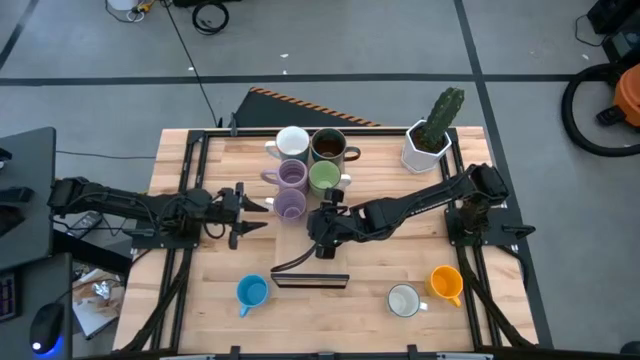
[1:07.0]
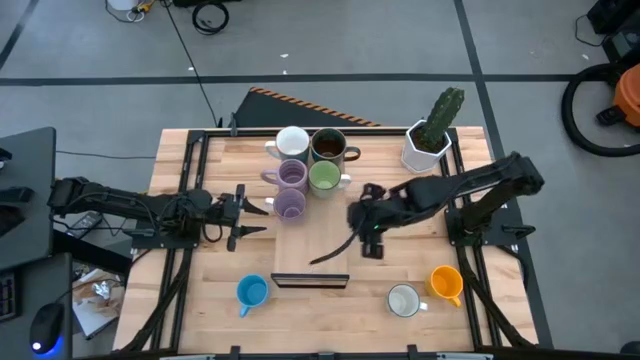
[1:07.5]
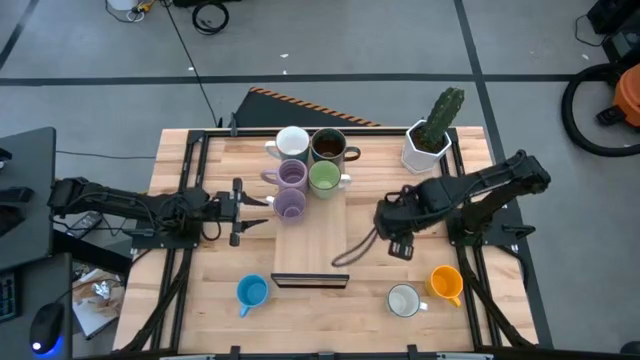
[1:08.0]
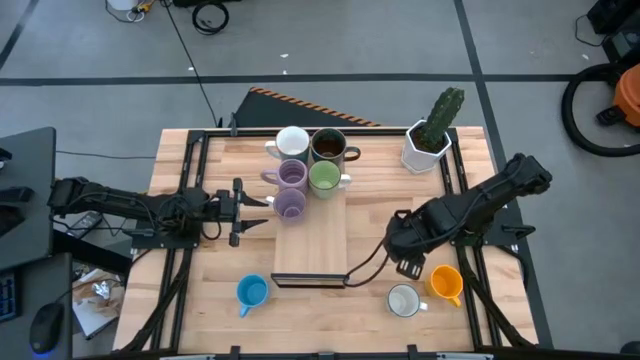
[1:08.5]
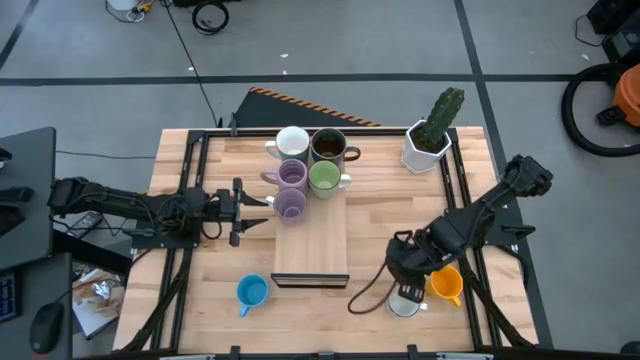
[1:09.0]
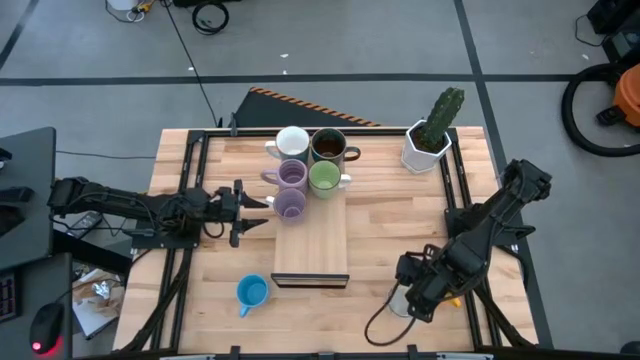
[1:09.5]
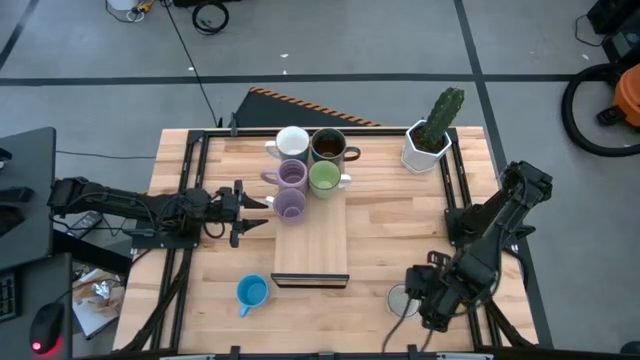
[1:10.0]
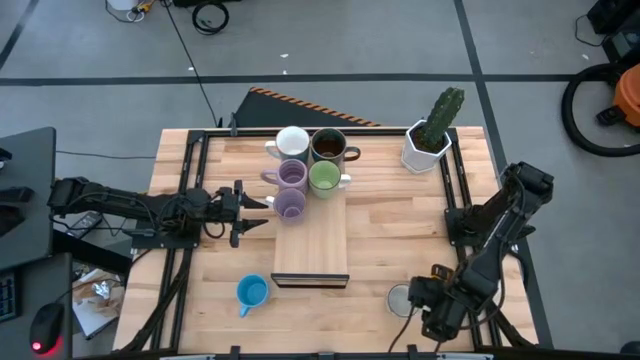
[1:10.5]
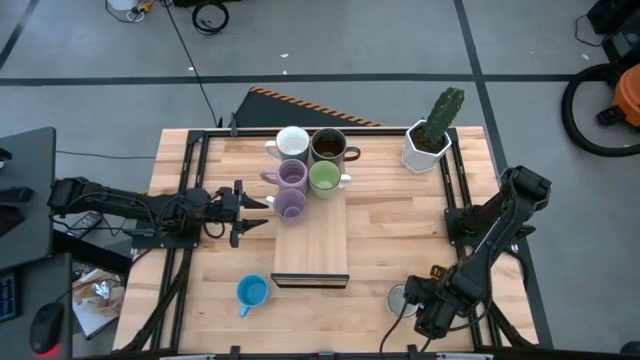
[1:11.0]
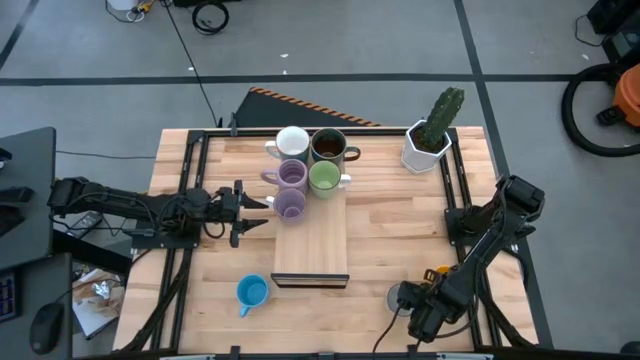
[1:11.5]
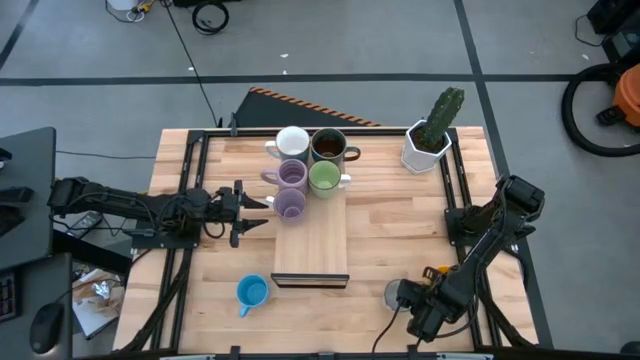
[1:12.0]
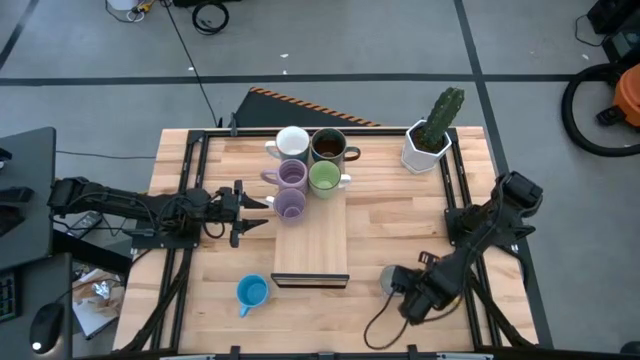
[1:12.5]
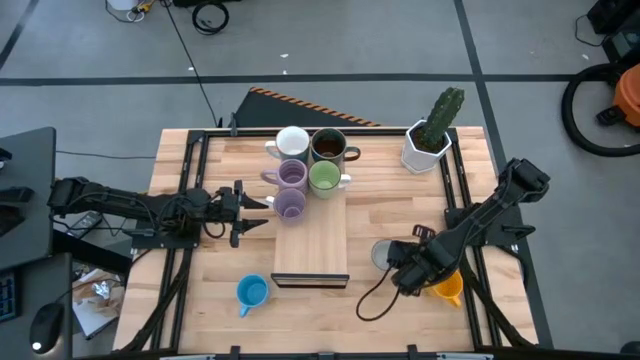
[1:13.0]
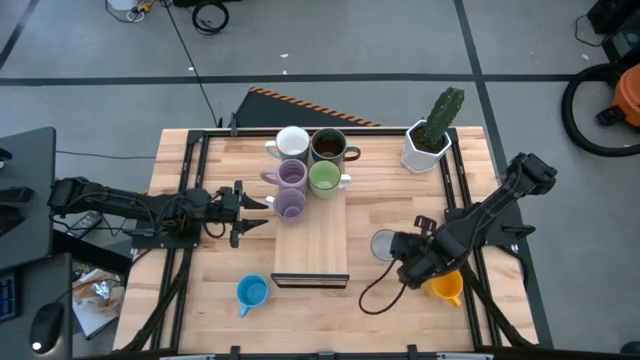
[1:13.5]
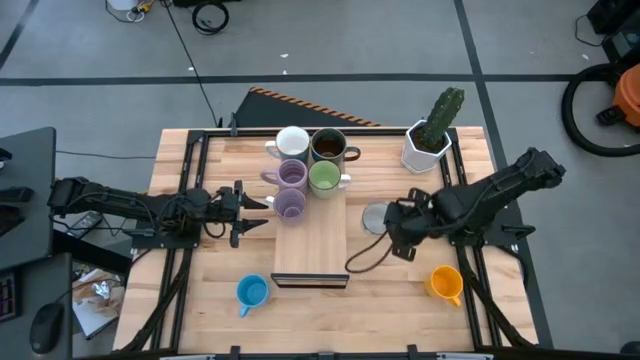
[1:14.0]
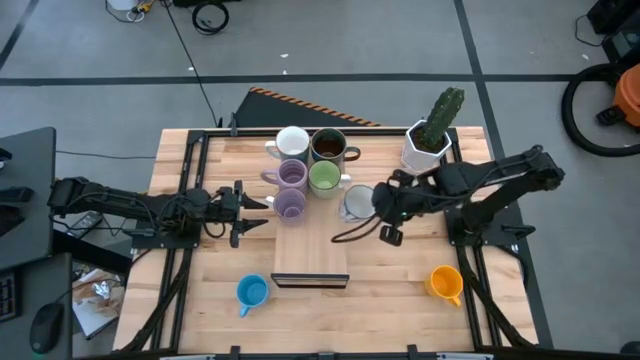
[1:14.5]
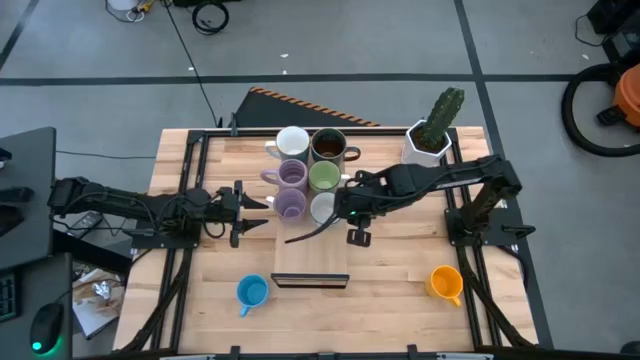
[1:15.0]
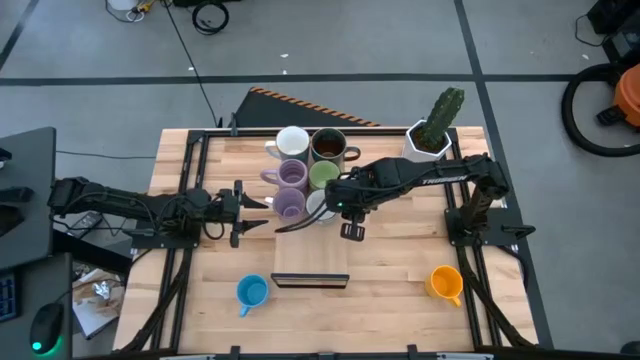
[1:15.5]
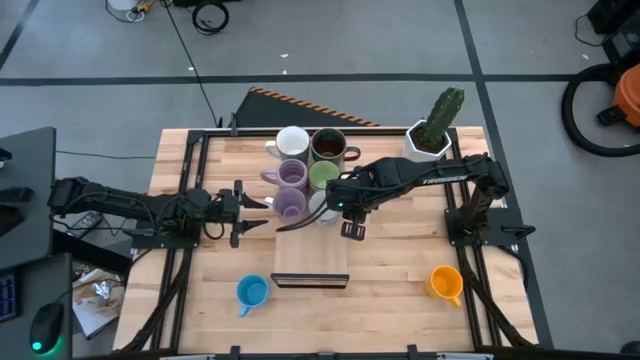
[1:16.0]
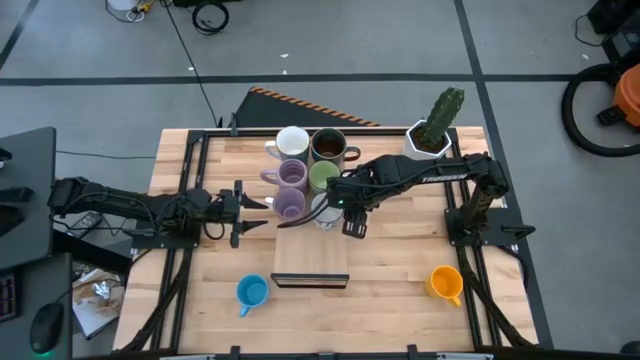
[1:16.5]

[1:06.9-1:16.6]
Task: Place coffee mugs
Put the white blue mug on the shelf

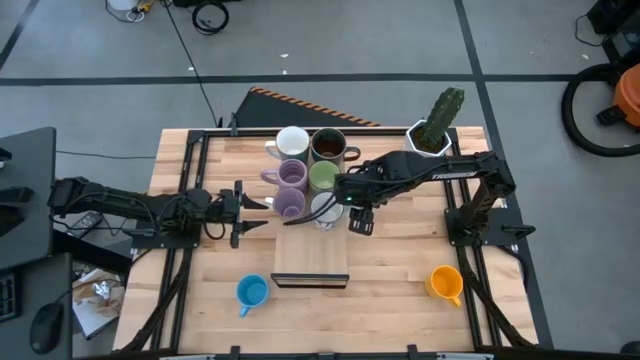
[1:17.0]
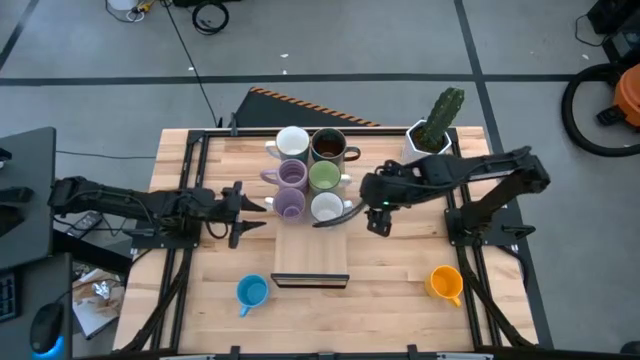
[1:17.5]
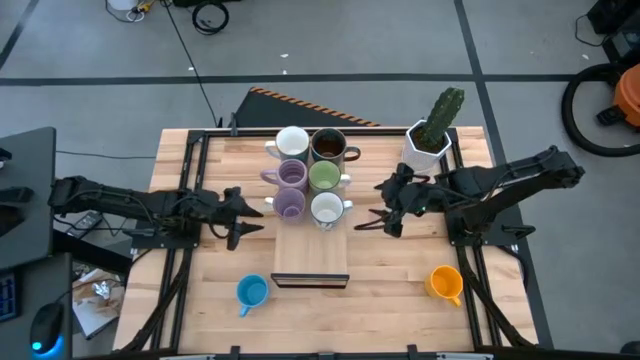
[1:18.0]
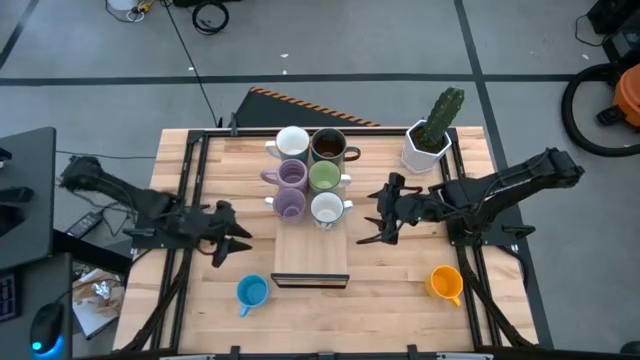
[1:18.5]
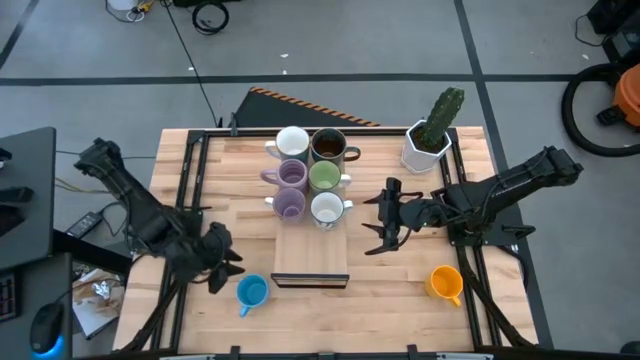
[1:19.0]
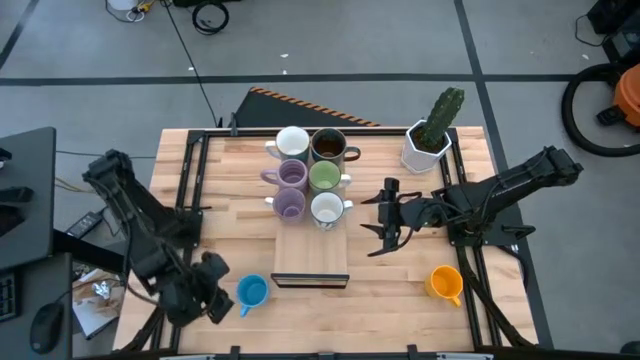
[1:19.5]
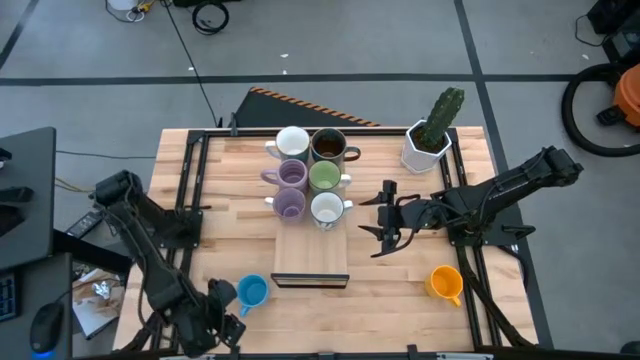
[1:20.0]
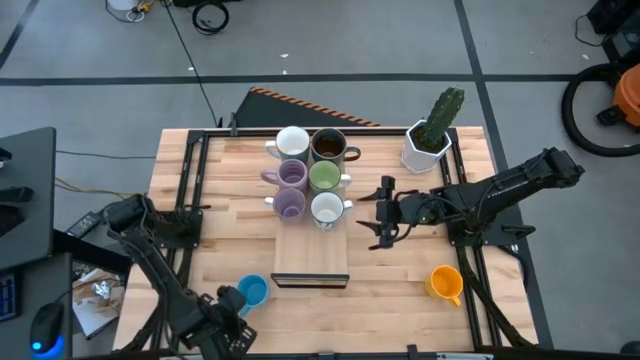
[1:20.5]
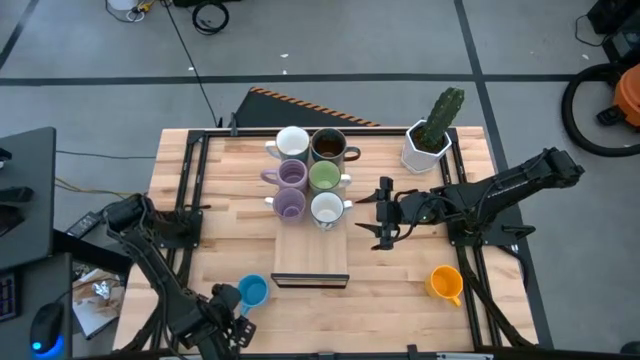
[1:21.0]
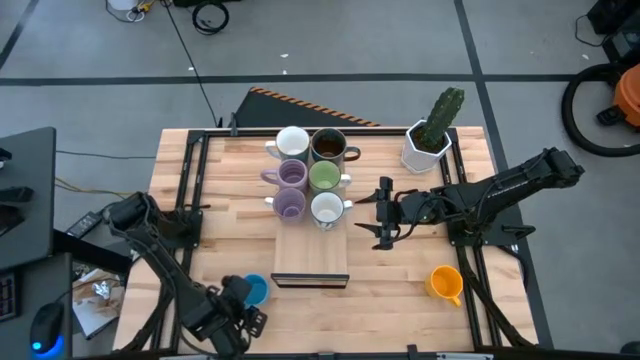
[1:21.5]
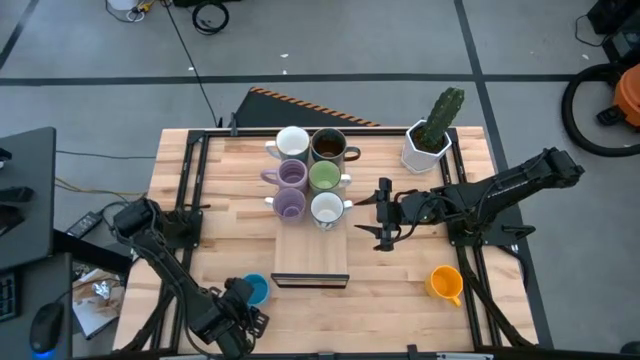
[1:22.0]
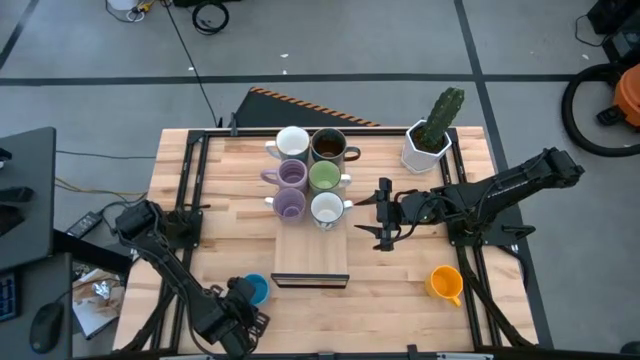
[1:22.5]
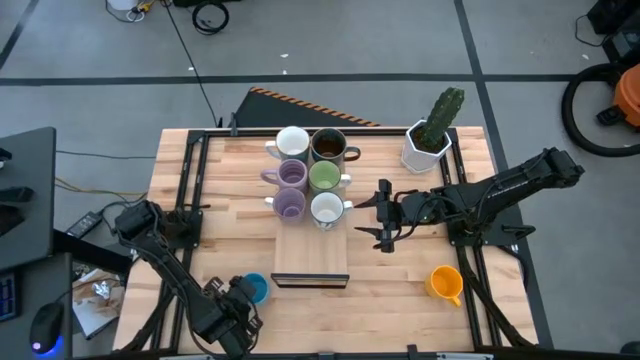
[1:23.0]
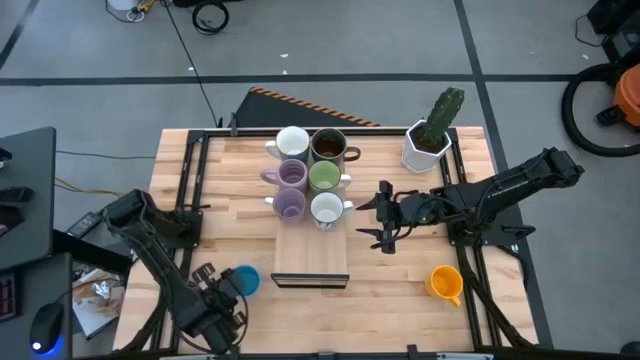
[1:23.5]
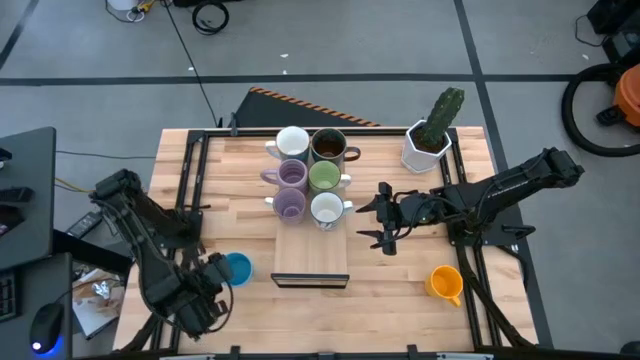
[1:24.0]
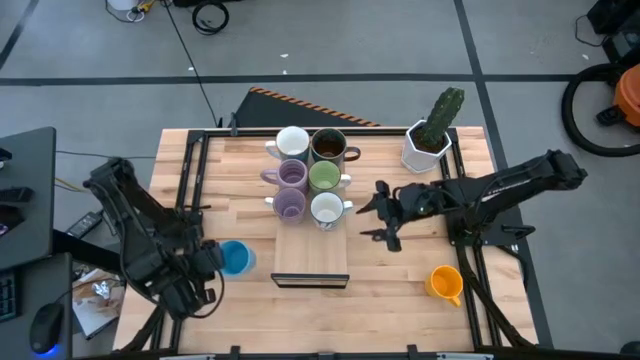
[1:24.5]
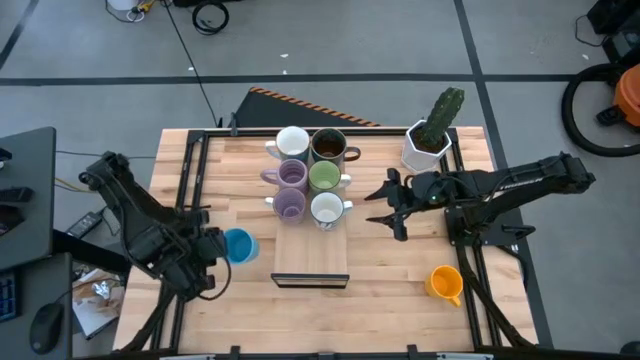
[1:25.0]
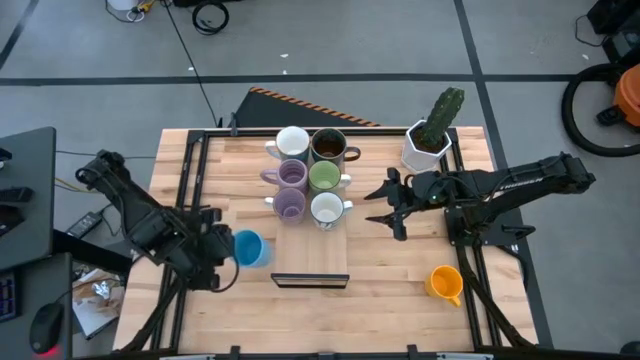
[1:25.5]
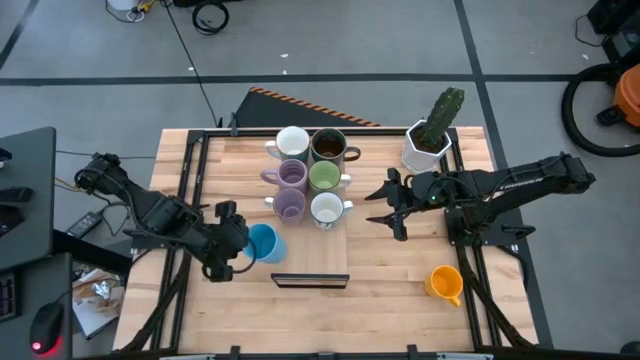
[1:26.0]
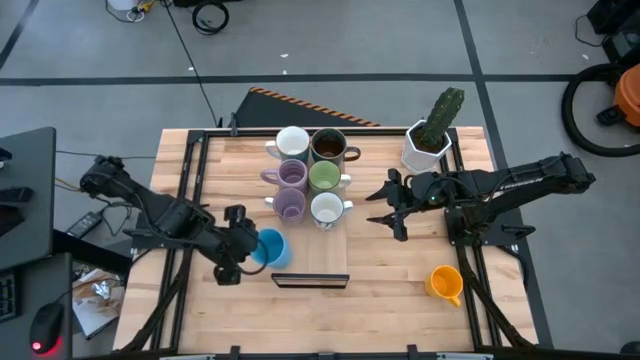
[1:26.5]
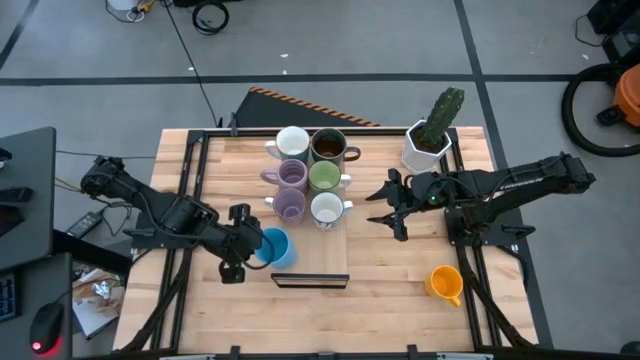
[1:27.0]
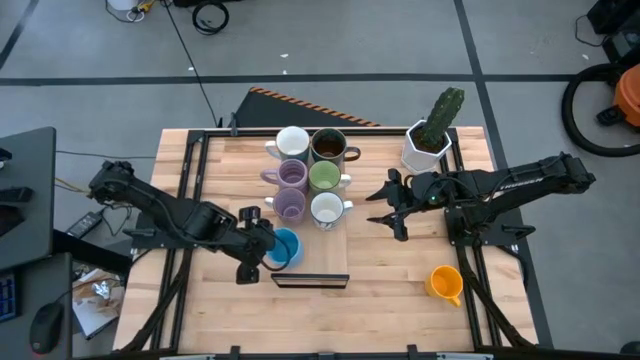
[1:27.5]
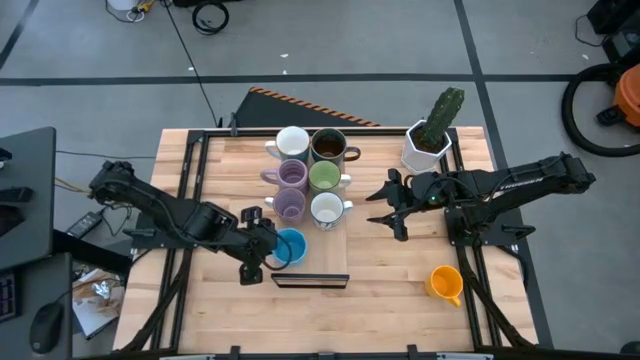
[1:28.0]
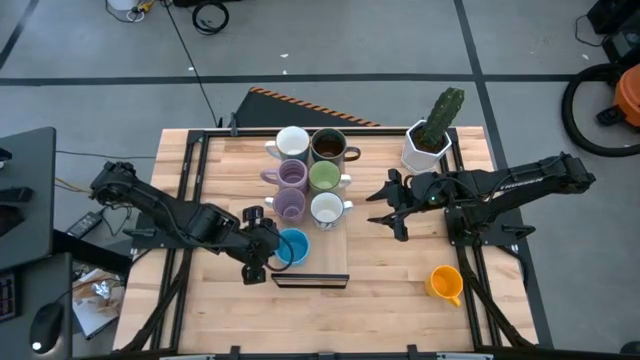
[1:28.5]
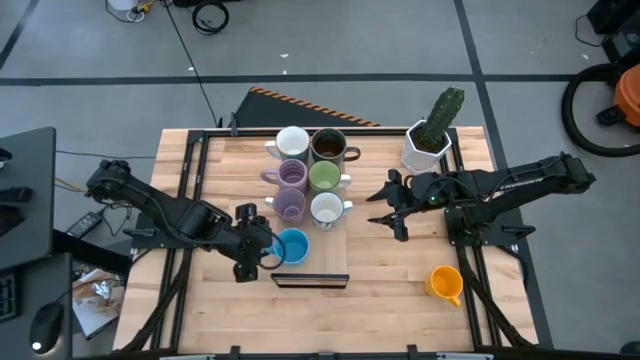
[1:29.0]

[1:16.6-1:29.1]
Put the blue mug on the shelf
